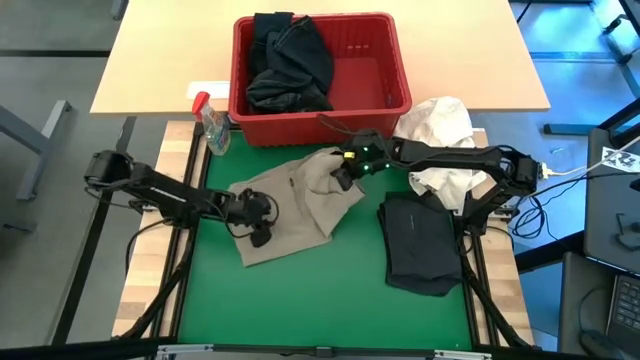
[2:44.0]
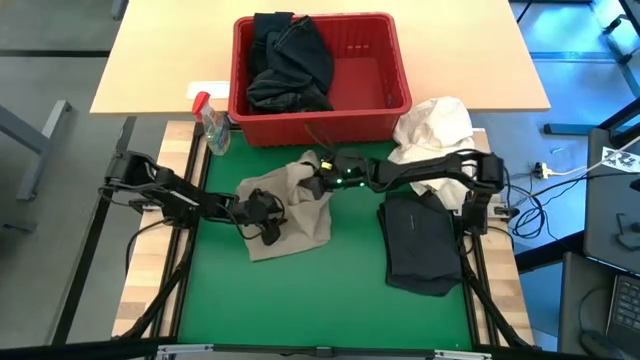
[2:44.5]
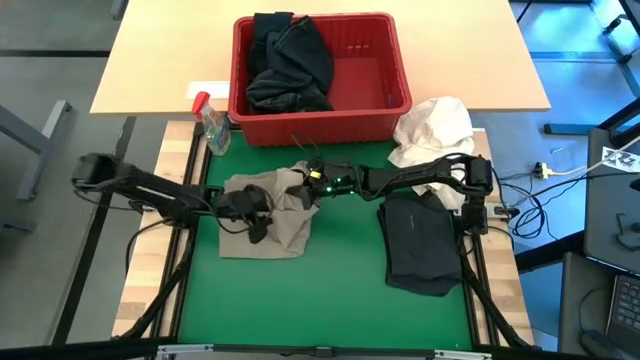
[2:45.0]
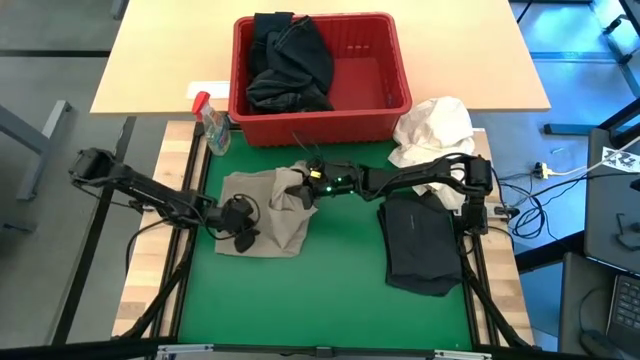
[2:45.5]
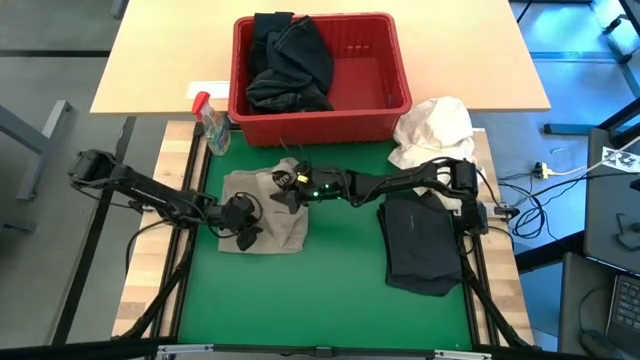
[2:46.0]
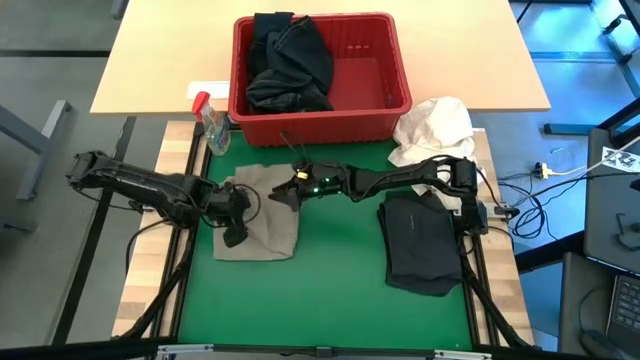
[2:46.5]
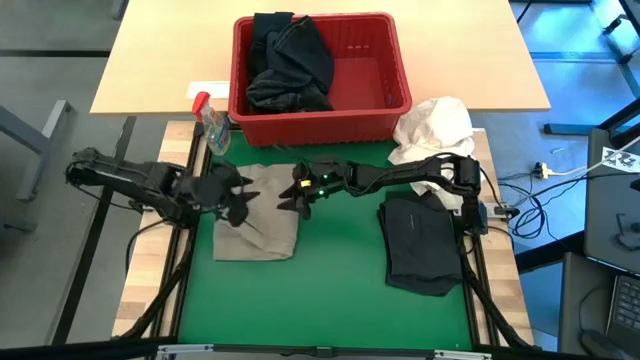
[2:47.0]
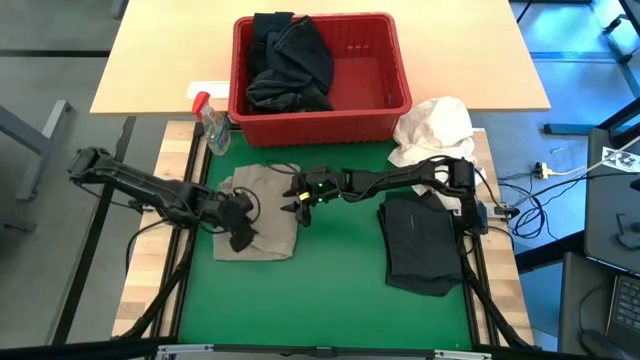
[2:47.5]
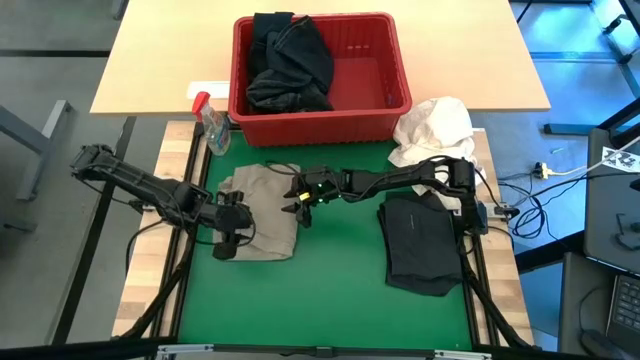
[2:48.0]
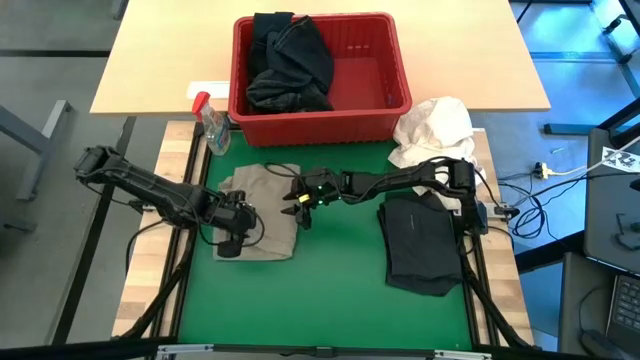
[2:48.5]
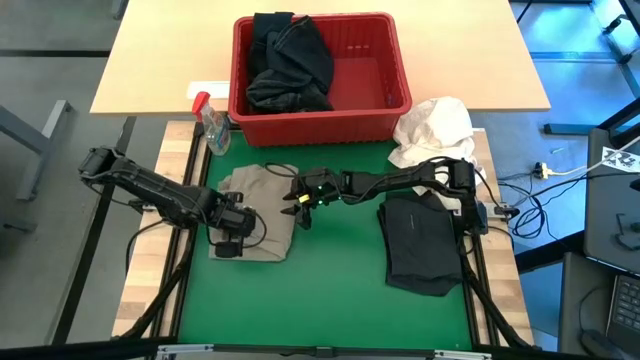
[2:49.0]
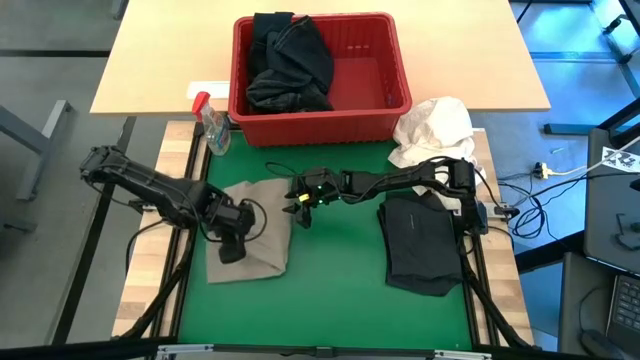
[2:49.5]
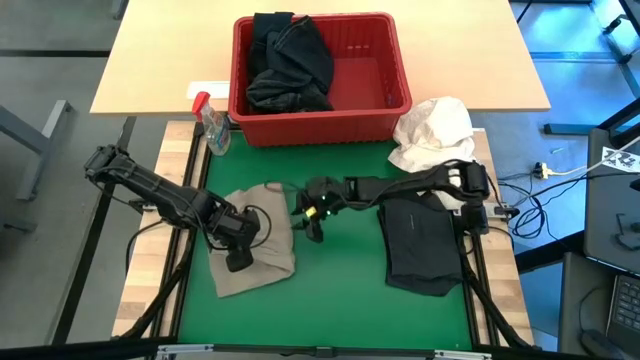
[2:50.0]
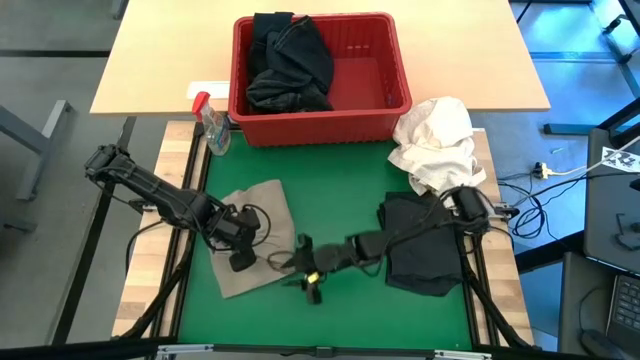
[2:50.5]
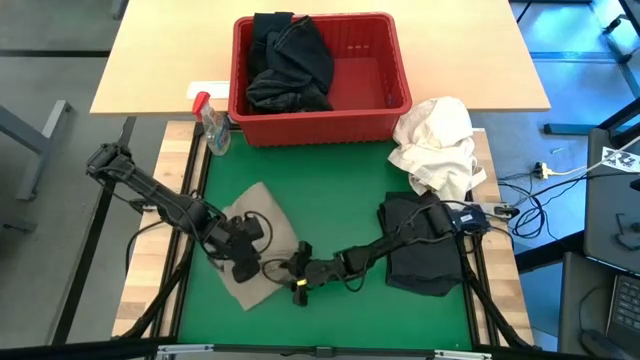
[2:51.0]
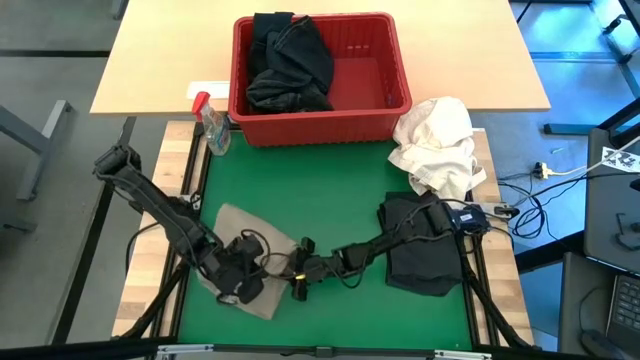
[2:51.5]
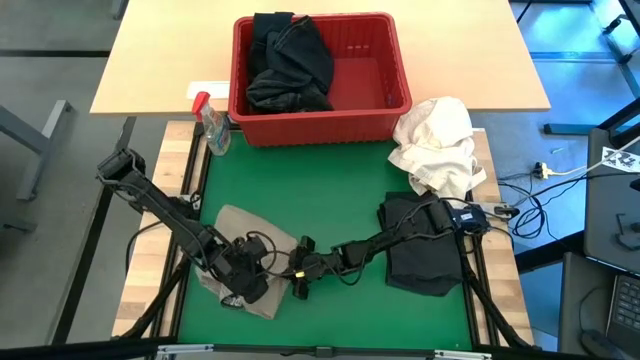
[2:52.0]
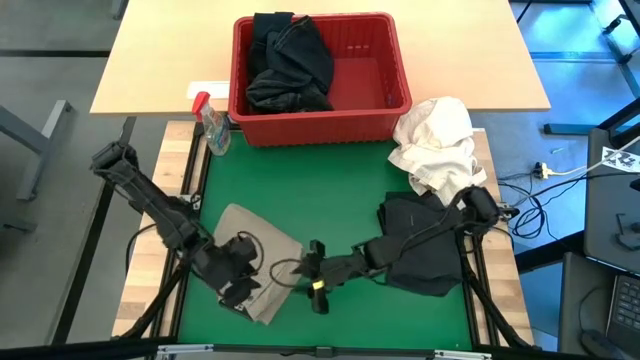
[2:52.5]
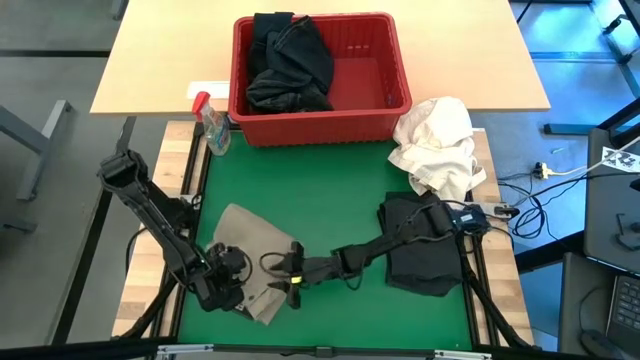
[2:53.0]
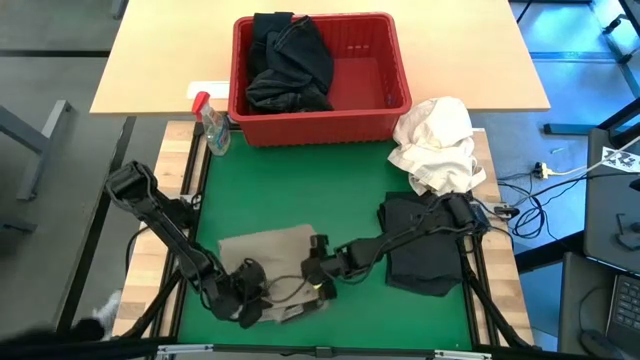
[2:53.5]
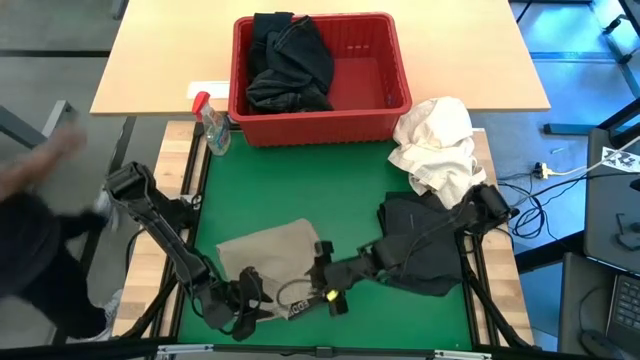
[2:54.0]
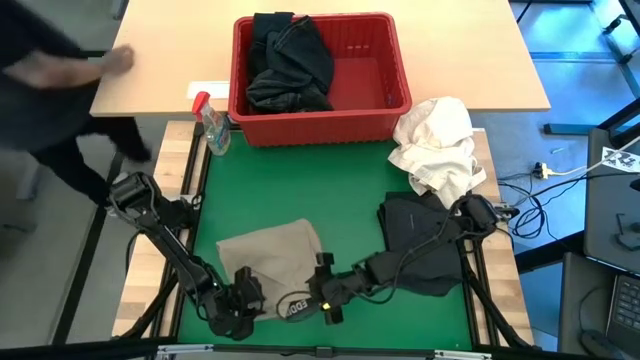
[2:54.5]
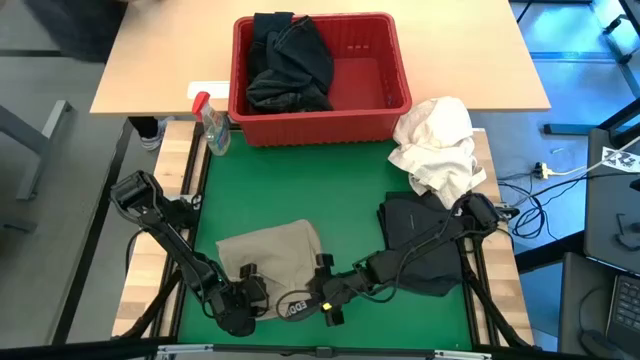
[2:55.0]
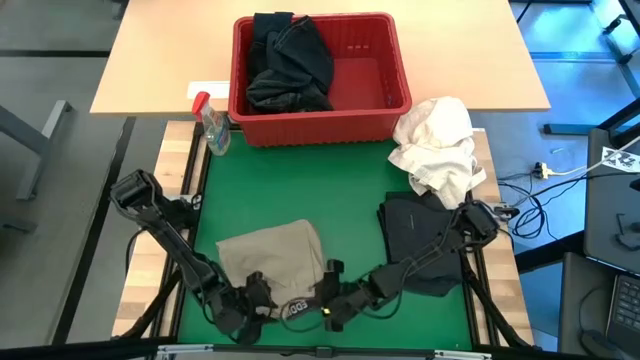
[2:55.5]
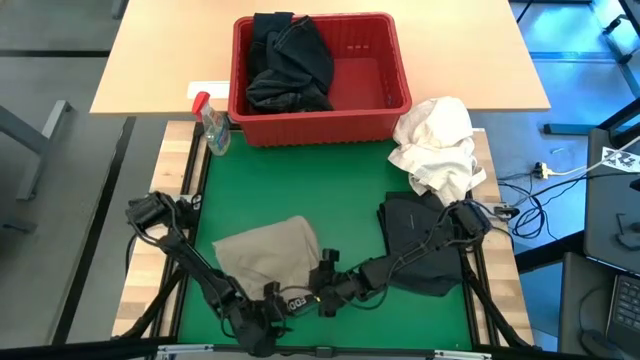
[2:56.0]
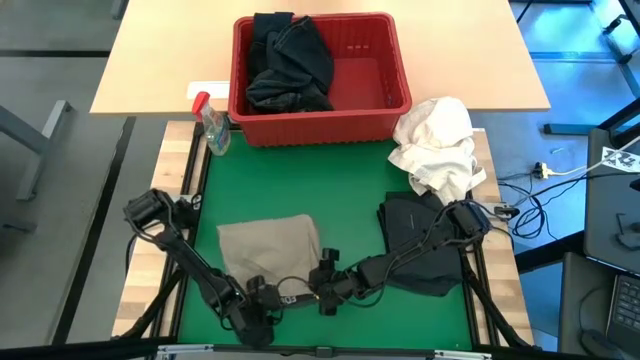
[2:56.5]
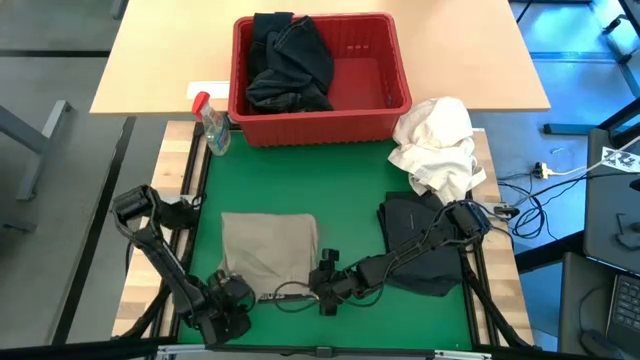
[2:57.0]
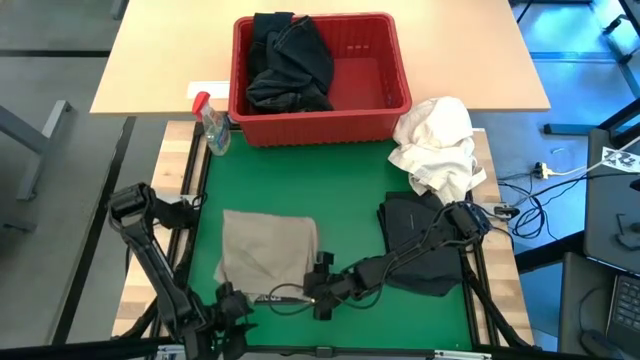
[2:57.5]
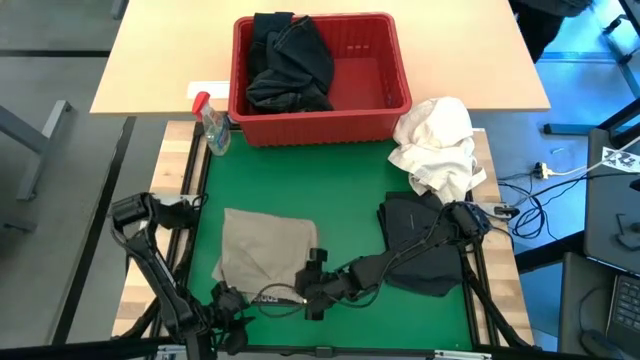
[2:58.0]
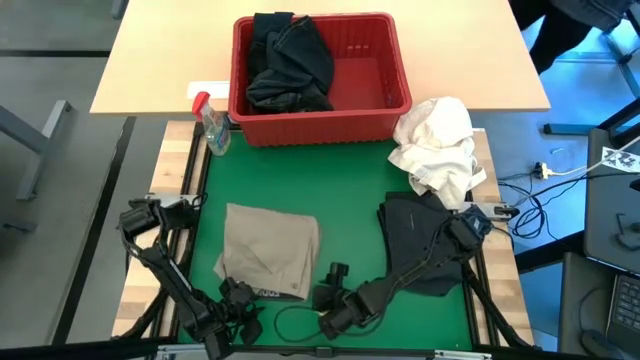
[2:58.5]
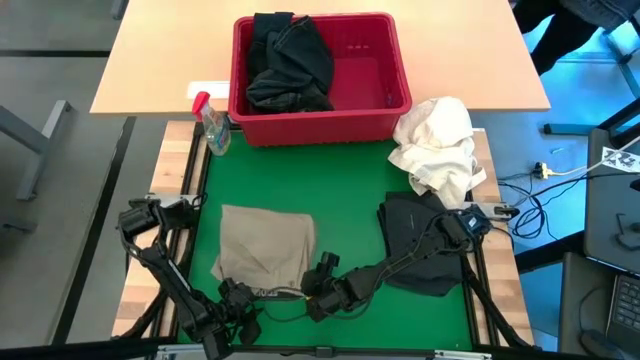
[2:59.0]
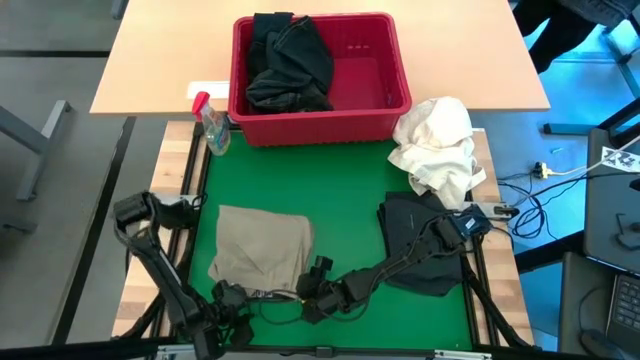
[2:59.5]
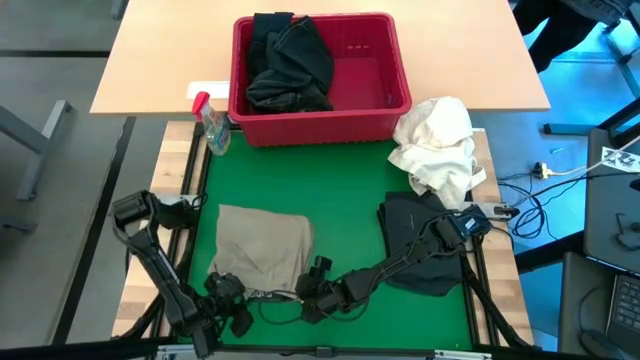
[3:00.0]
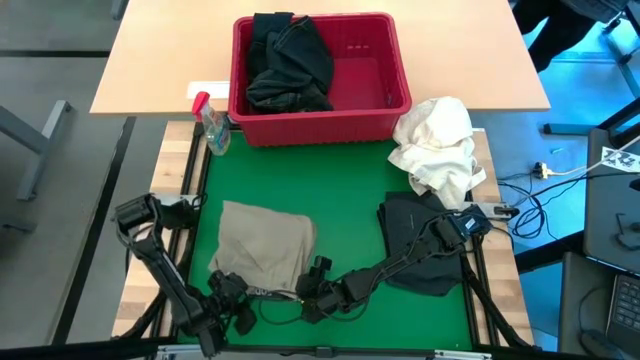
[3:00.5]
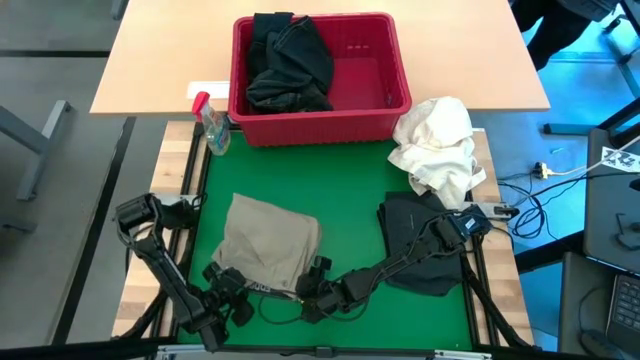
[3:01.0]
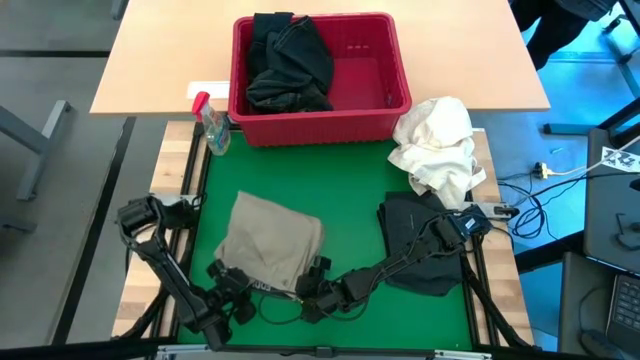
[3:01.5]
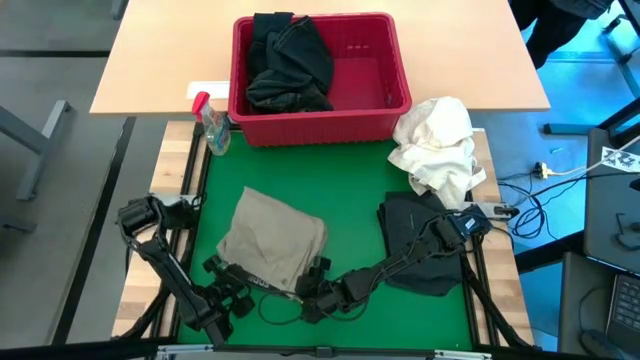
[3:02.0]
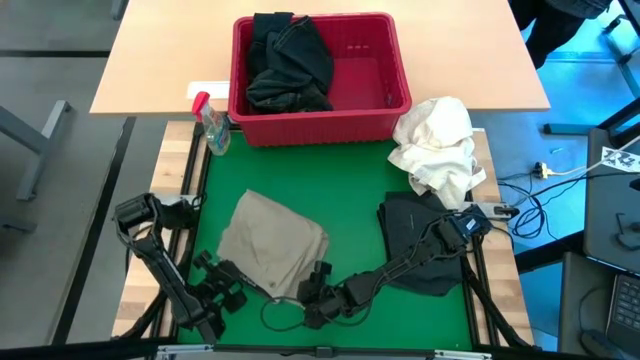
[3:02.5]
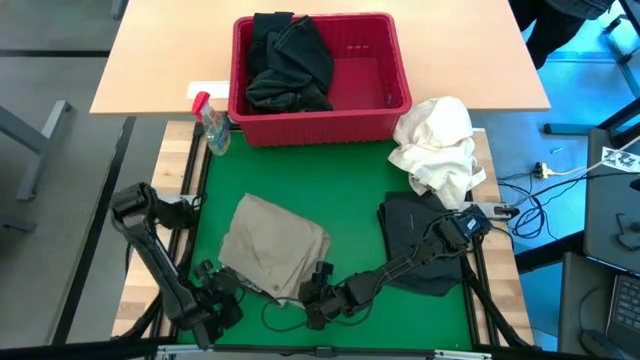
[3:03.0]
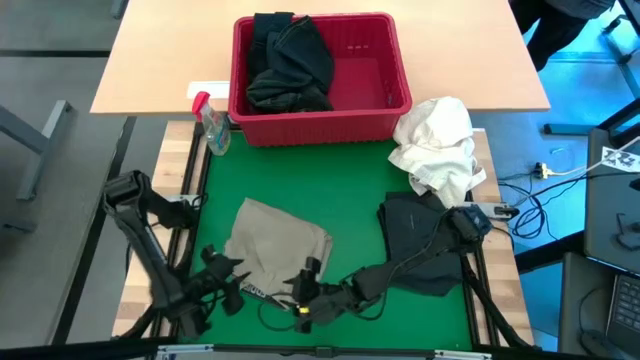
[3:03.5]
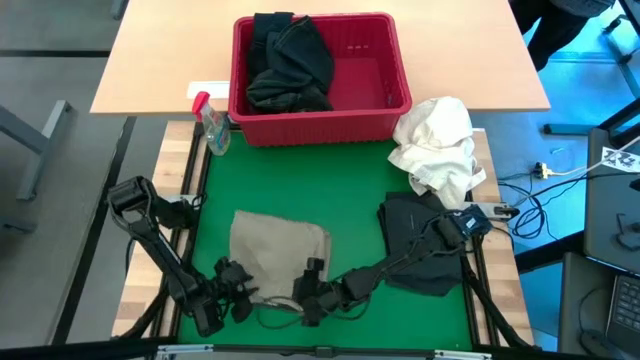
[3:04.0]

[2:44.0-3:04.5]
Task: Fold Laundry from Bin
Fold the brown shorts
